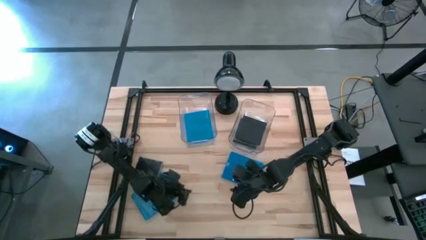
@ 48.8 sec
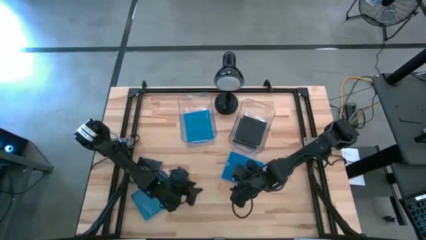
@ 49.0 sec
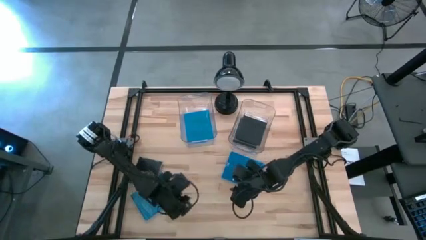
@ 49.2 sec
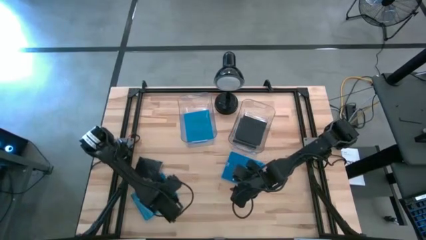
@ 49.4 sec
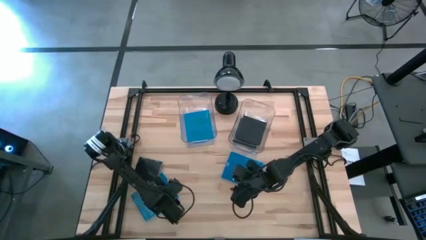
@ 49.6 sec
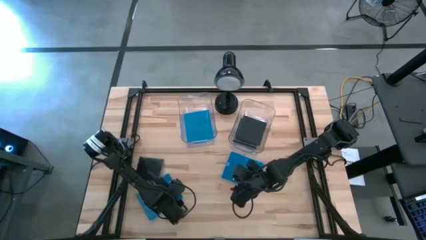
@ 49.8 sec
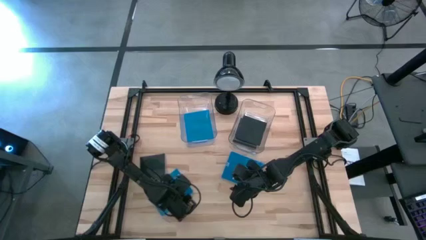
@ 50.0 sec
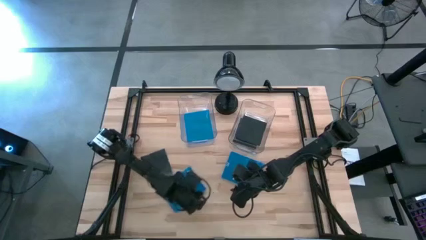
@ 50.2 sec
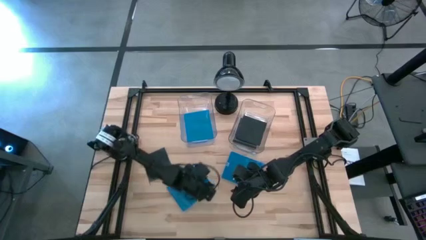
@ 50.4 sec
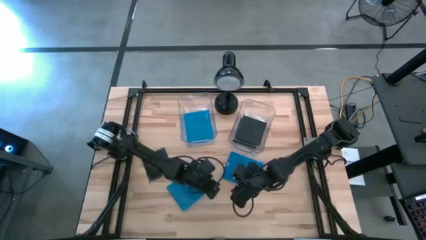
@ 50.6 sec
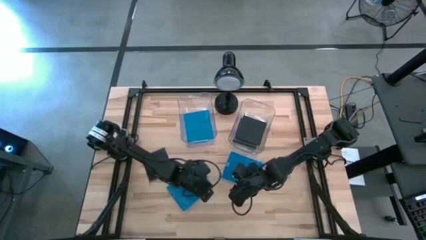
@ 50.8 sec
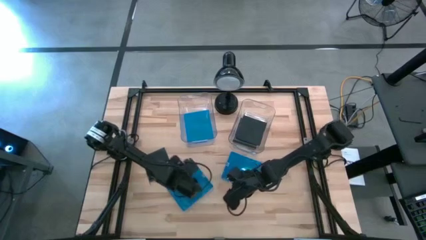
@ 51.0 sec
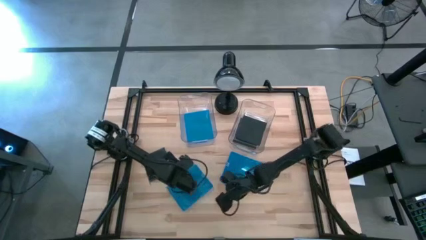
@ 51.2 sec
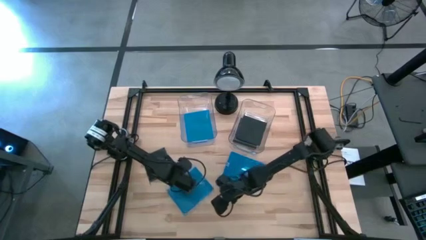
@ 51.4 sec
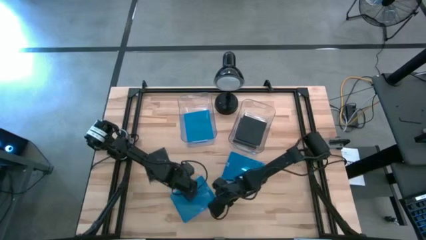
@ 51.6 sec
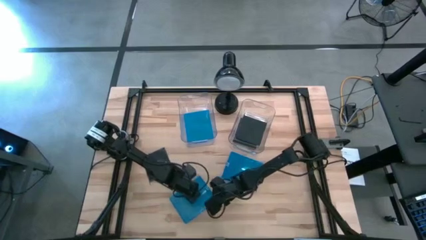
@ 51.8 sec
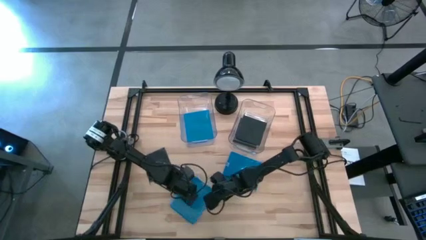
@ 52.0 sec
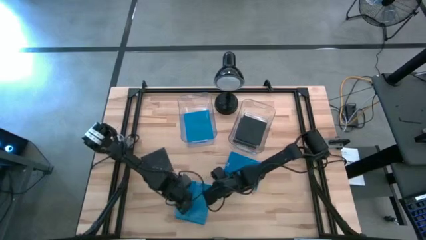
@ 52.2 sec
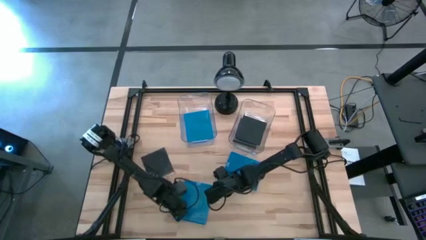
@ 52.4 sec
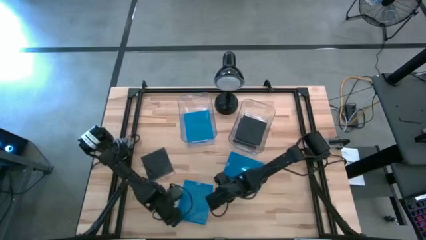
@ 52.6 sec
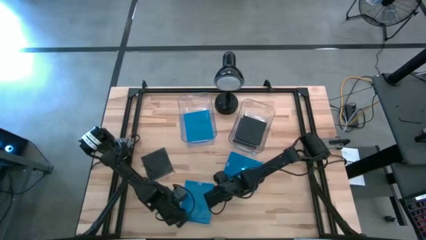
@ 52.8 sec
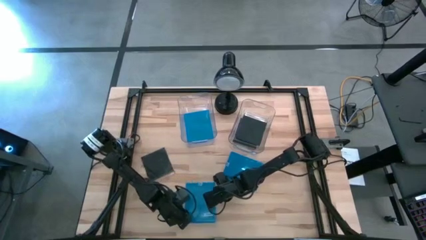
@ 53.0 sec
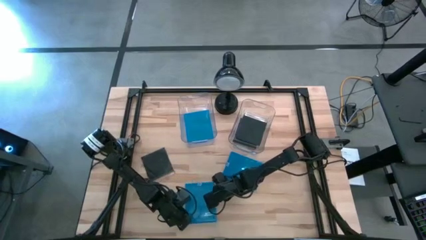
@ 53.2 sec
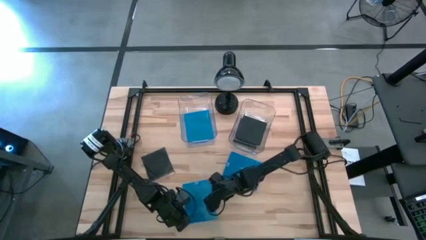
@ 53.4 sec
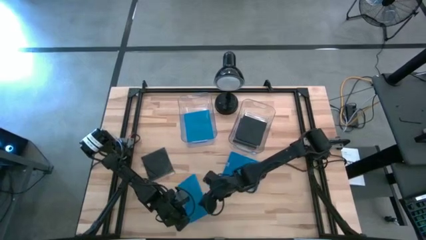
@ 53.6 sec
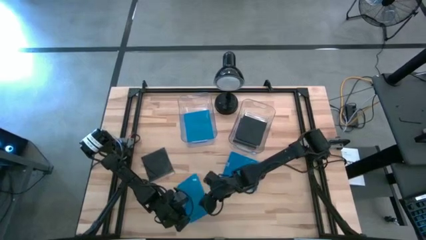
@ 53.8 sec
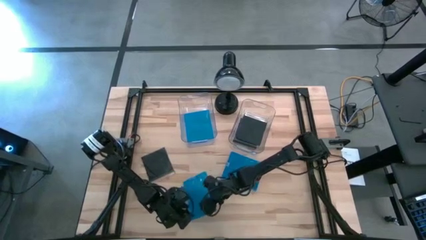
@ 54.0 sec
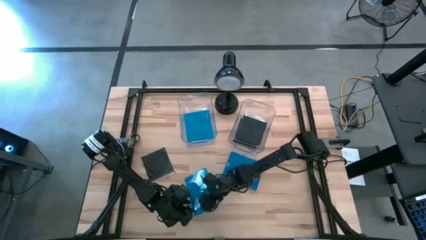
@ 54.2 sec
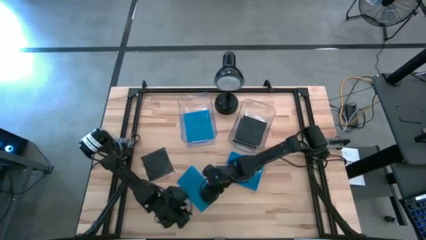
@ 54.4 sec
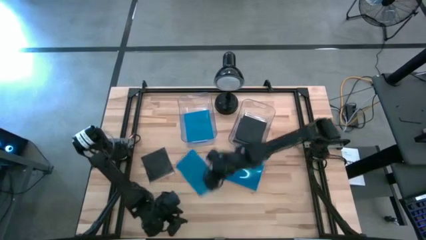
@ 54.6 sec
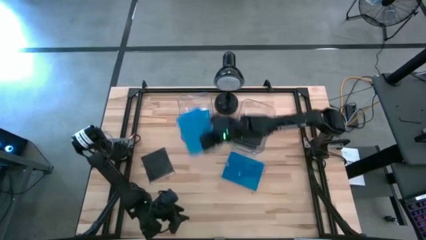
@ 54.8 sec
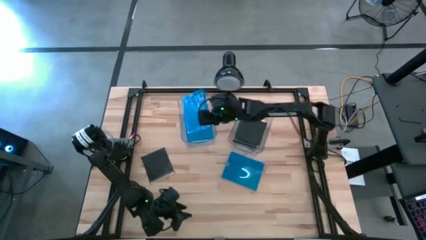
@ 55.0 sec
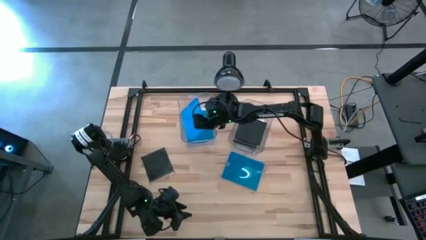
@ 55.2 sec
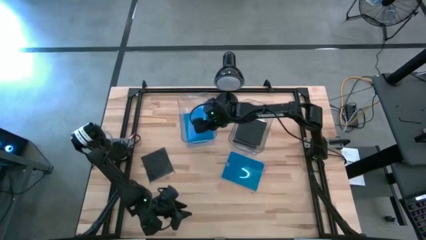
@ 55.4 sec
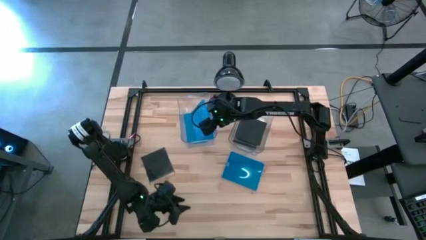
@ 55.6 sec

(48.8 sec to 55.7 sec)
Task: Pick & place jewel cases by type
Put the blue CD case into the left transparent bin

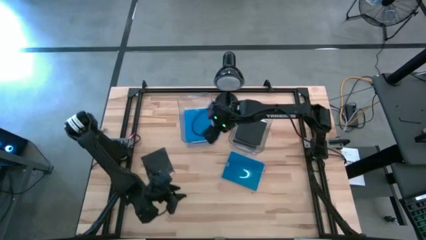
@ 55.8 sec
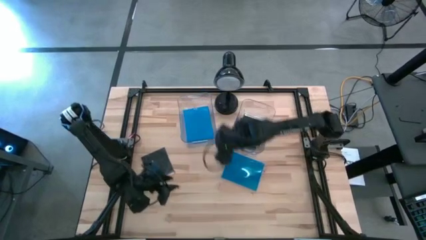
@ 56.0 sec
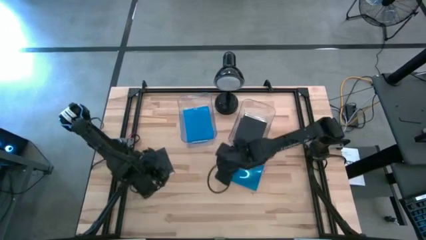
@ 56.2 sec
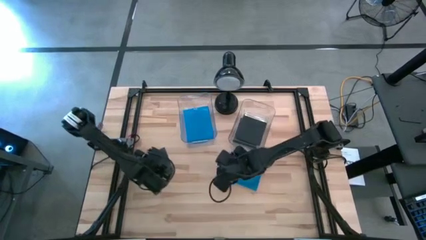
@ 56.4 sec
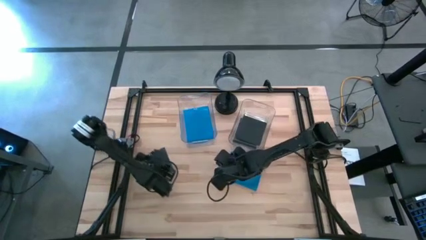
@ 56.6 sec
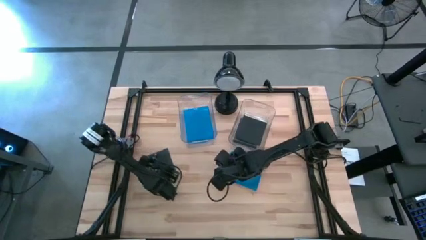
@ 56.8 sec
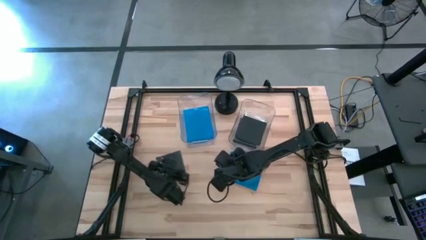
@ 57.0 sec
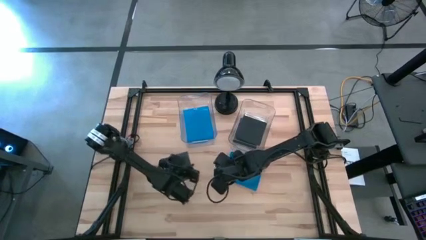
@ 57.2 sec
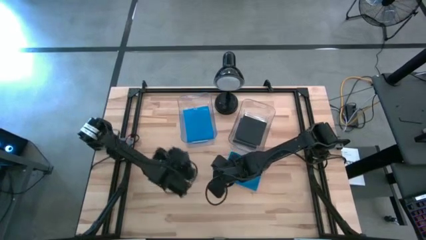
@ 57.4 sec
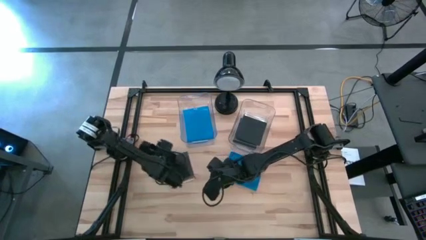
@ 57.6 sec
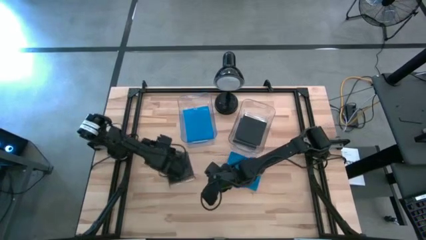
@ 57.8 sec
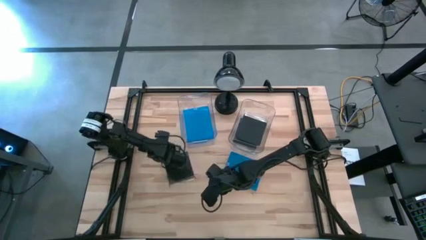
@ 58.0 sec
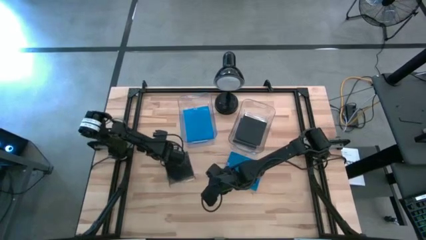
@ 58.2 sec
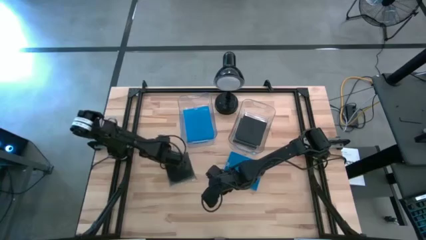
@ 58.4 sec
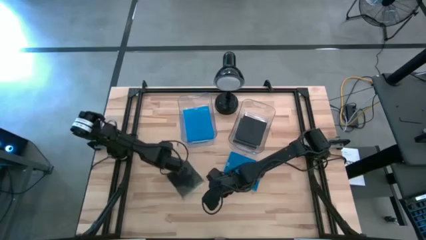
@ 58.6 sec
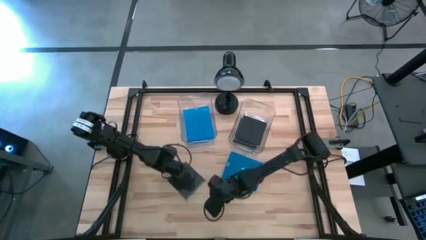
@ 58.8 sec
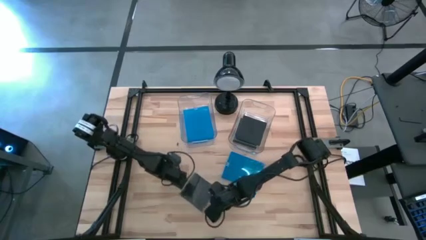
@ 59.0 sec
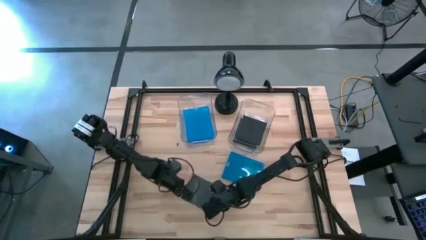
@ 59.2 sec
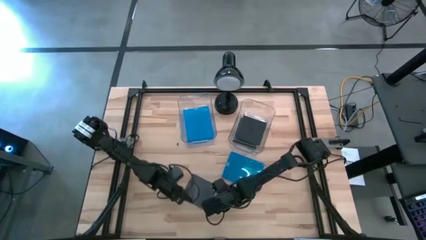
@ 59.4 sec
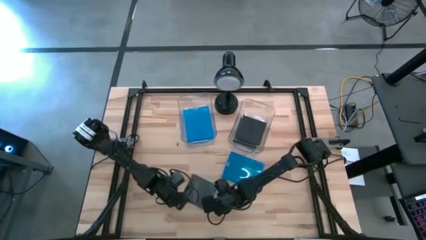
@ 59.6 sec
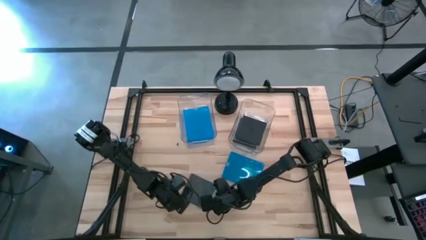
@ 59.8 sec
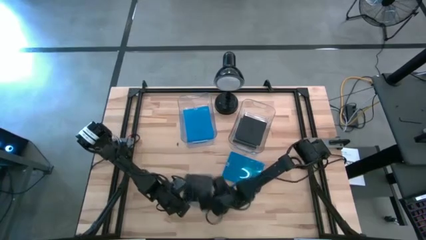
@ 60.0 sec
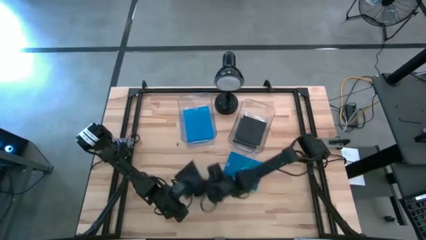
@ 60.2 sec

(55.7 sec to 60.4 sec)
Put the black CD case into the right transparent bin

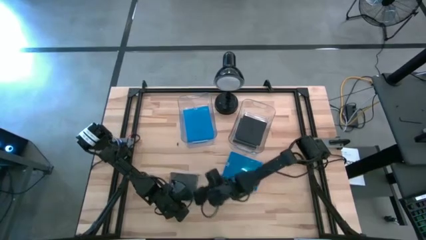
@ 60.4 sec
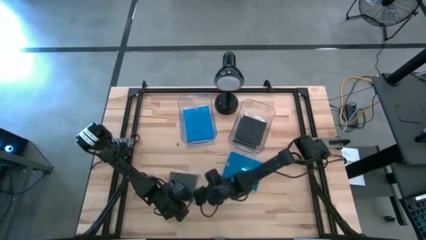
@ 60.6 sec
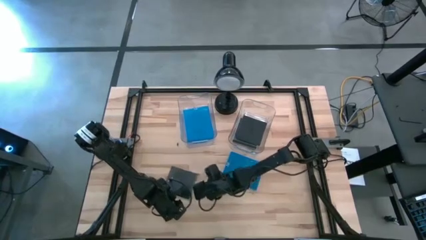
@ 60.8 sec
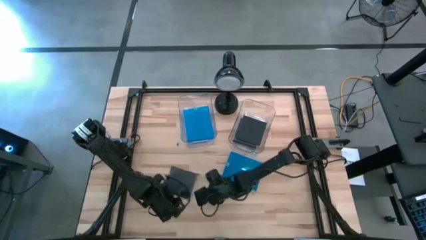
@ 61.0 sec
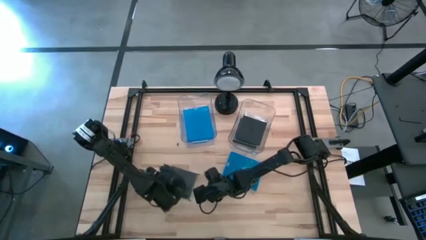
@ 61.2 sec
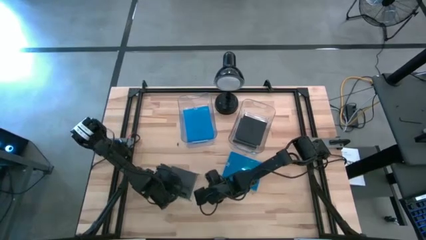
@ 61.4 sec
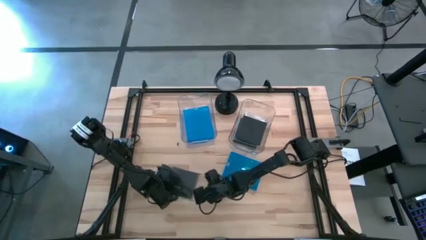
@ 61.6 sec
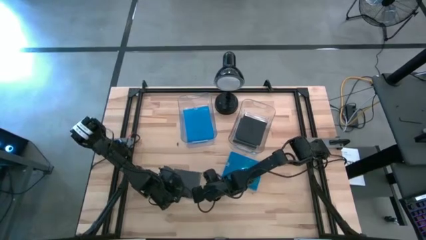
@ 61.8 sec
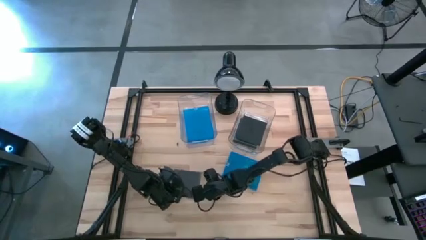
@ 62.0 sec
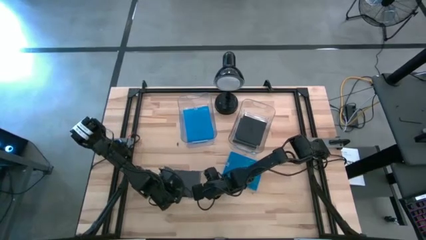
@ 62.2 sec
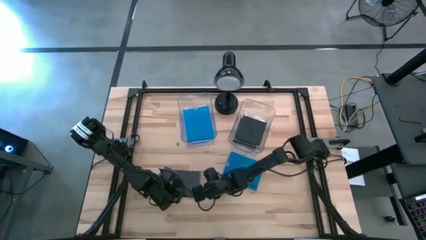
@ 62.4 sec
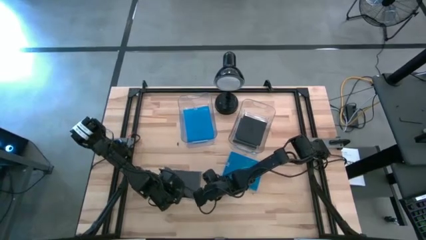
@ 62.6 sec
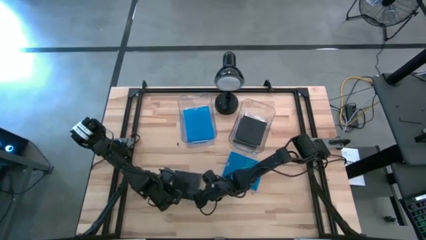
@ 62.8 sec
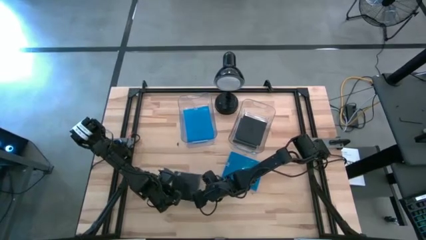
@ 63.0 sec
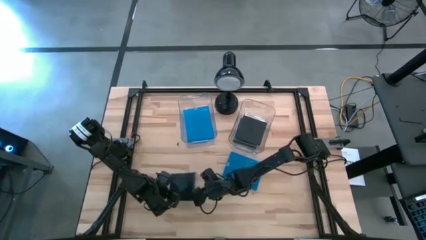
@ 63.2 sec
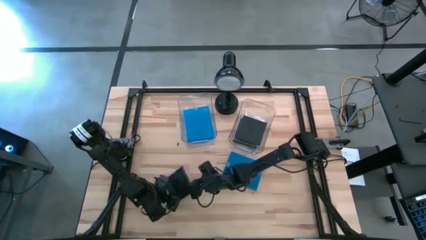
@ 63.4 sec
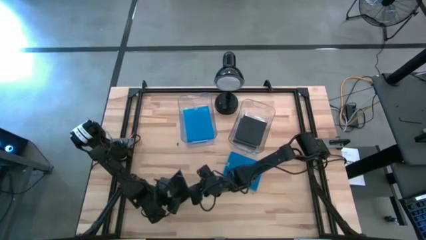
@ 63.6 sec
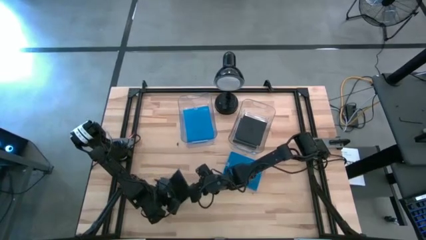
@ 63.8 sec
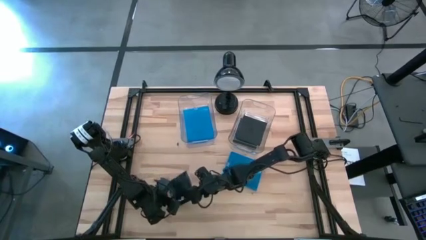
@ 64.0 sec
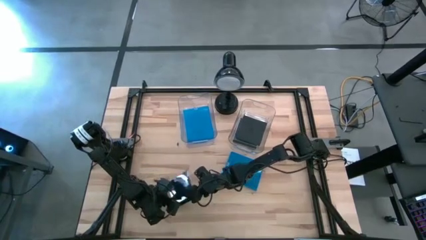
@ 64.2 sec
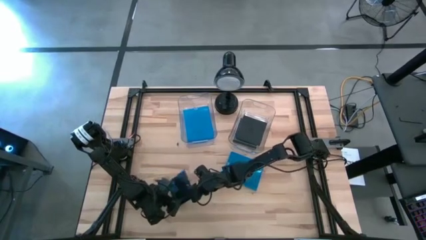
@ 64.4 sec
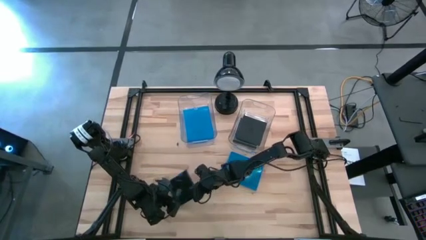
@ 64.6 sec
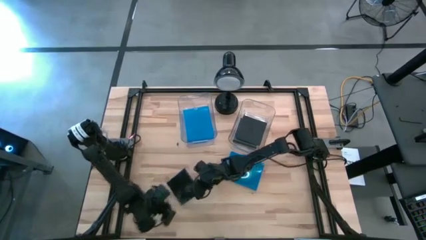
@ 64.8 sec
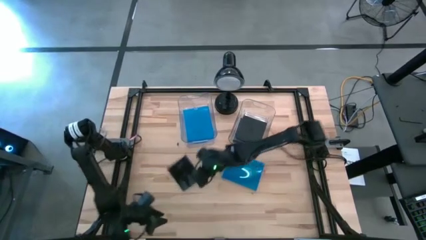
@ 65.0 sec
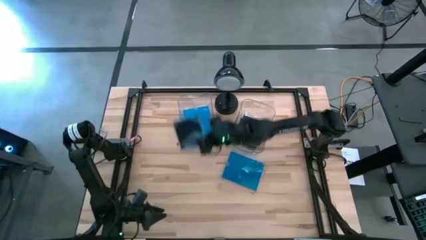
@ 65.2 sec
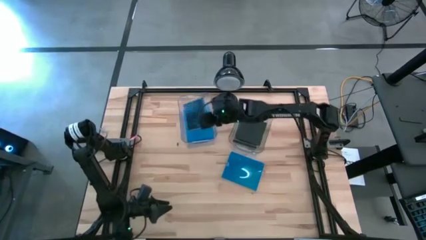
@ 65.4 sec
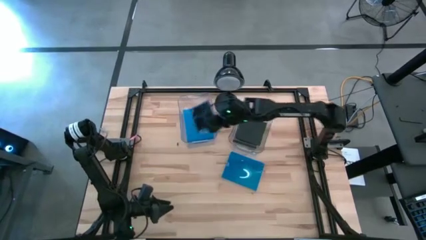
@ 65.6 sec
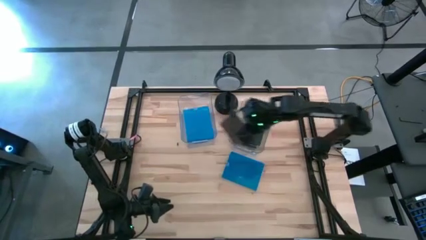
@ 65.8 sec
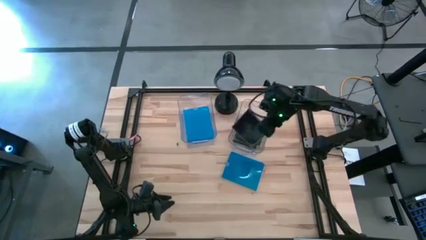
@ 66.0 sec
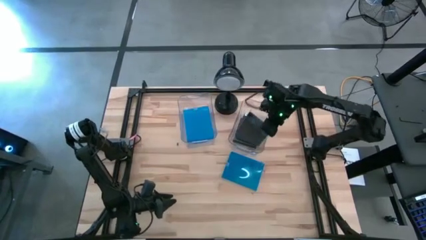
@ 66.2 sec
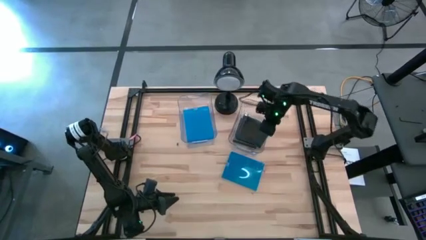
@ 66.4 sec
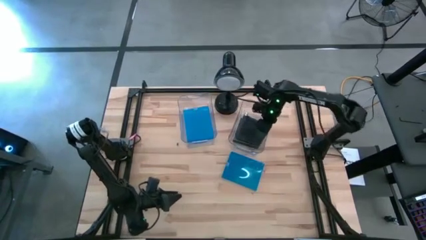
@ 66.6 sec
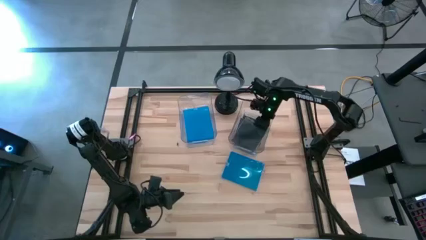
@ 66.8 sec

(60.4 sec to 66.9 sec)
Put the black CD case into the right transparent bin
